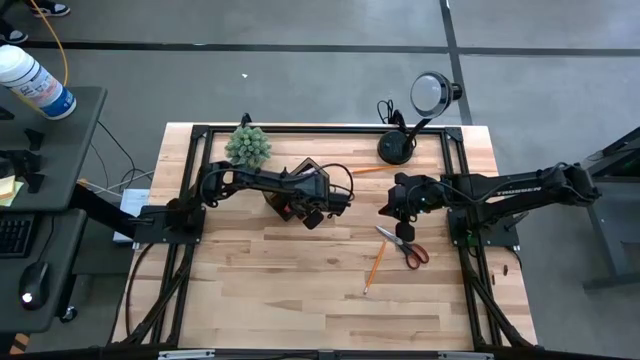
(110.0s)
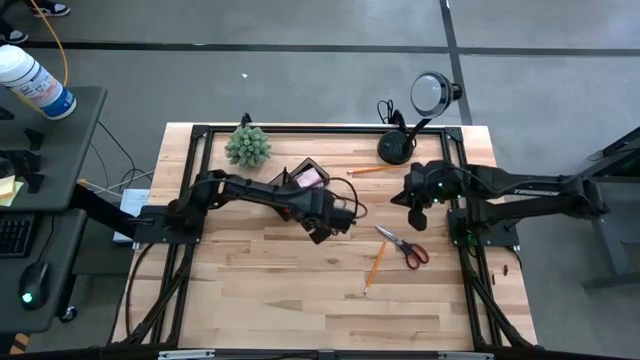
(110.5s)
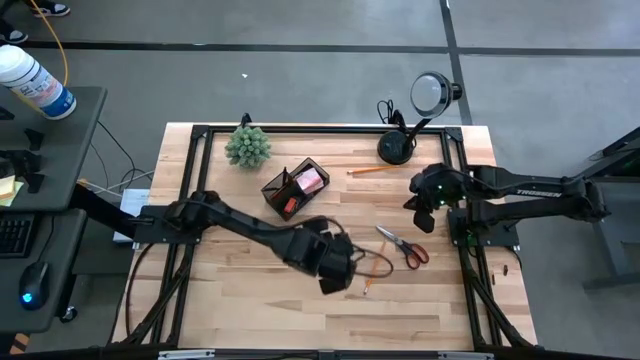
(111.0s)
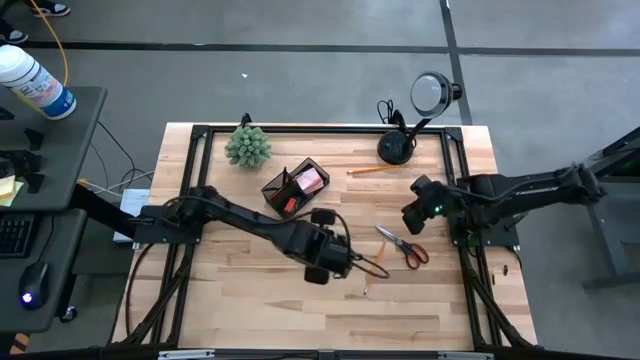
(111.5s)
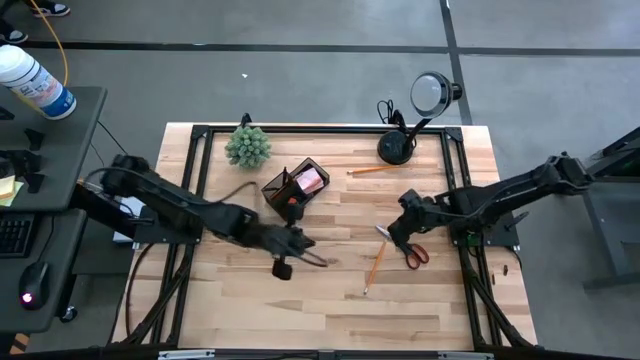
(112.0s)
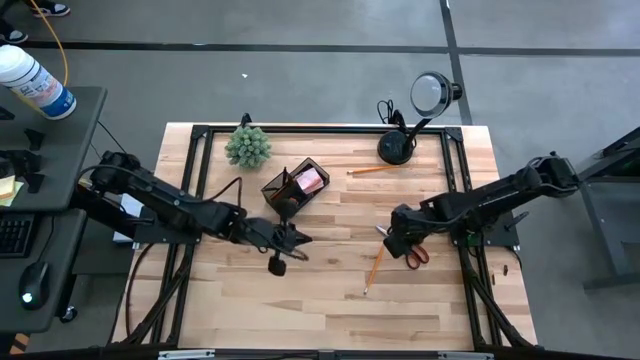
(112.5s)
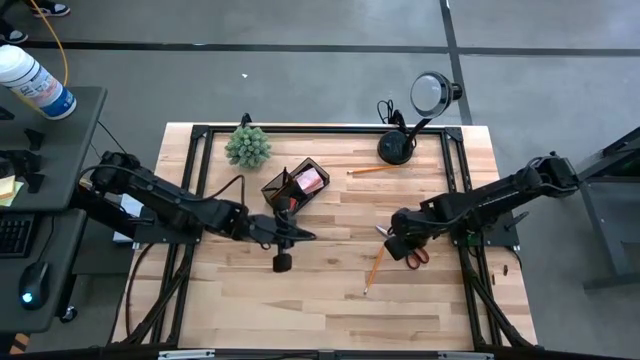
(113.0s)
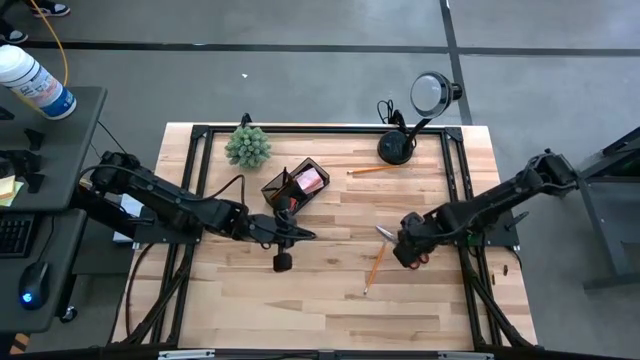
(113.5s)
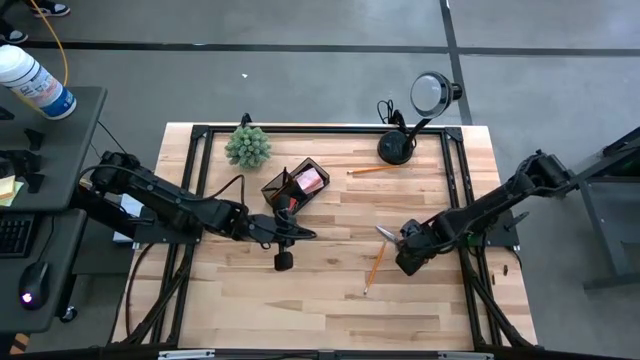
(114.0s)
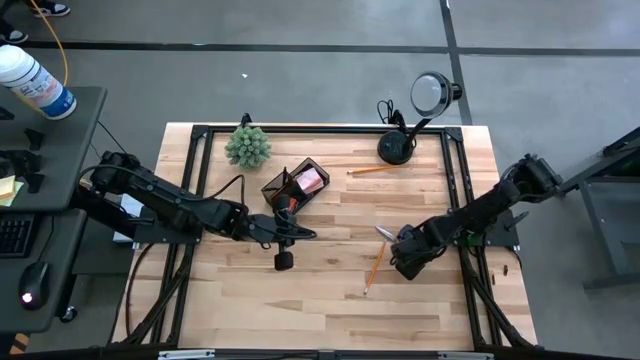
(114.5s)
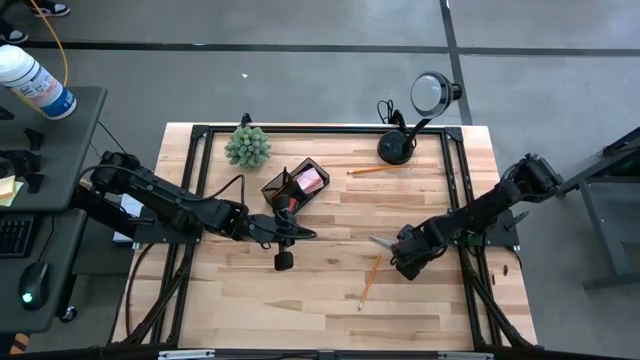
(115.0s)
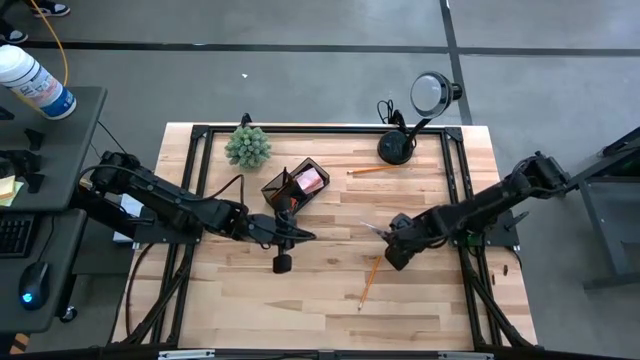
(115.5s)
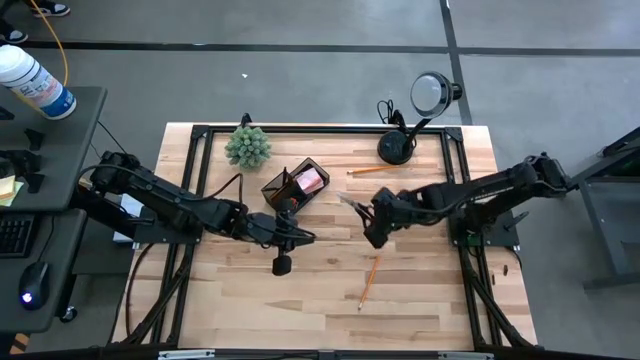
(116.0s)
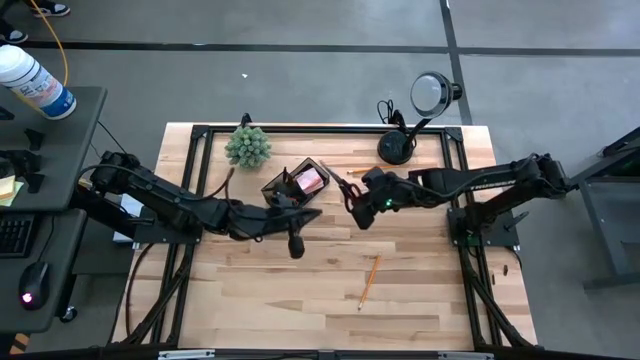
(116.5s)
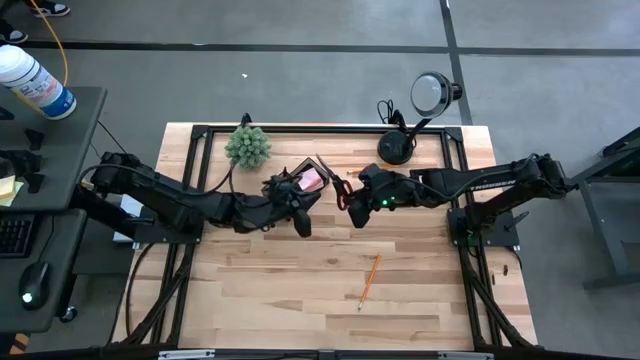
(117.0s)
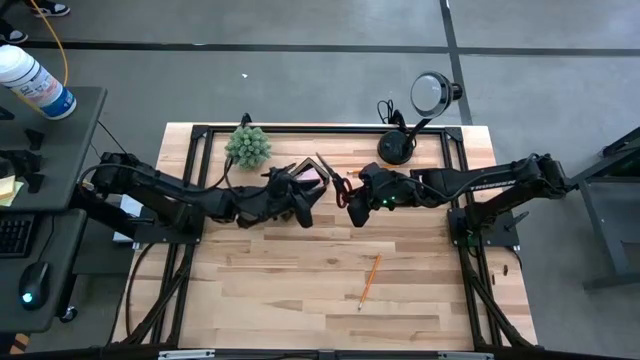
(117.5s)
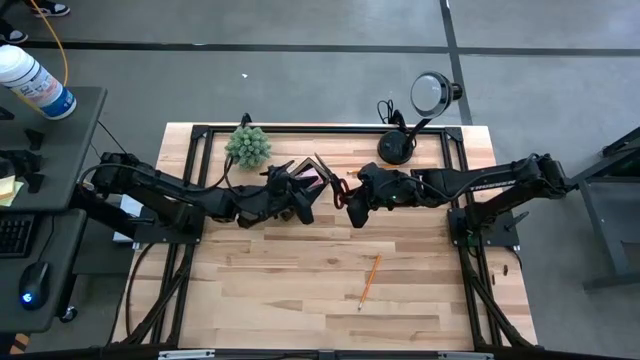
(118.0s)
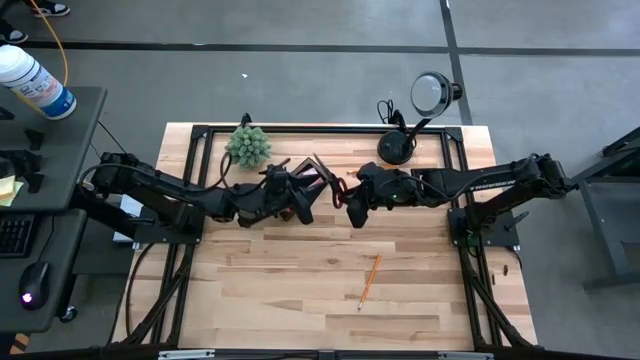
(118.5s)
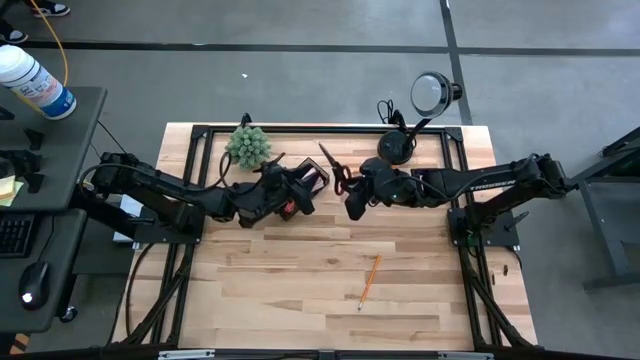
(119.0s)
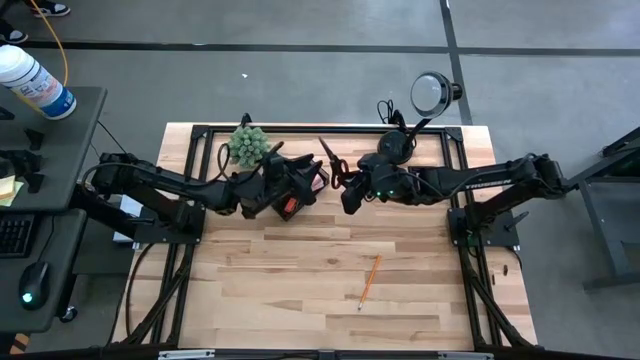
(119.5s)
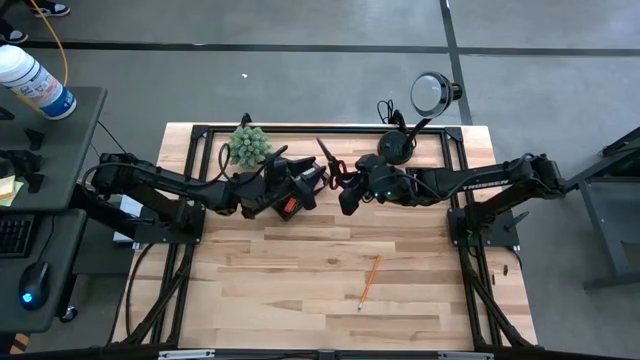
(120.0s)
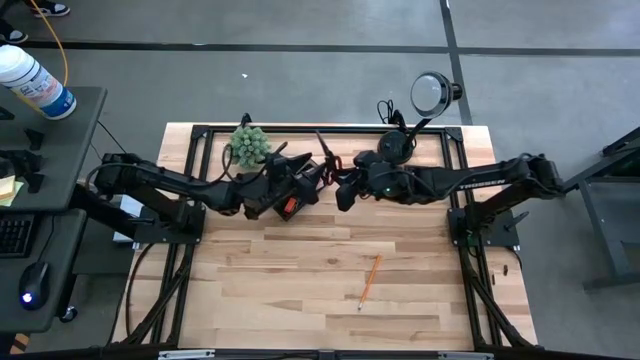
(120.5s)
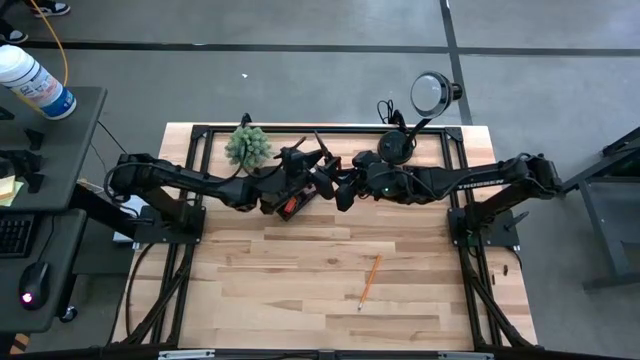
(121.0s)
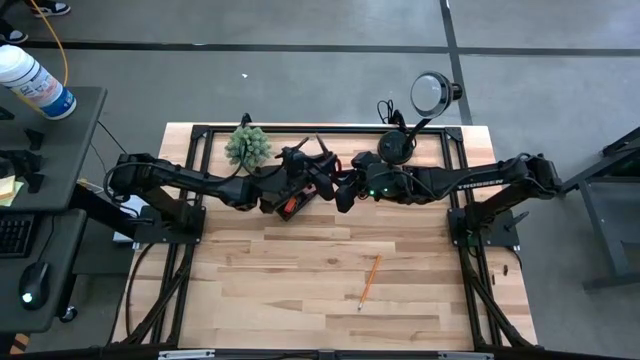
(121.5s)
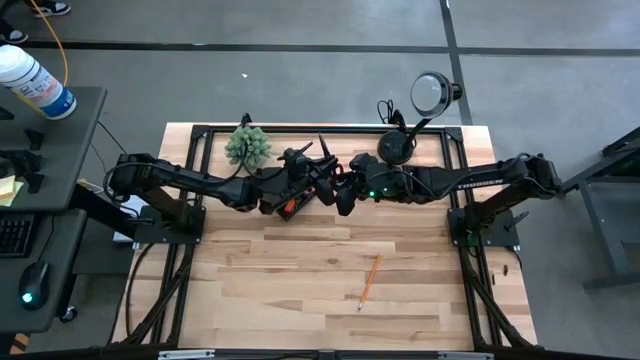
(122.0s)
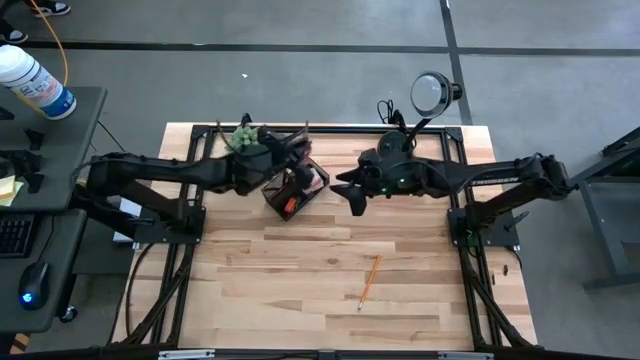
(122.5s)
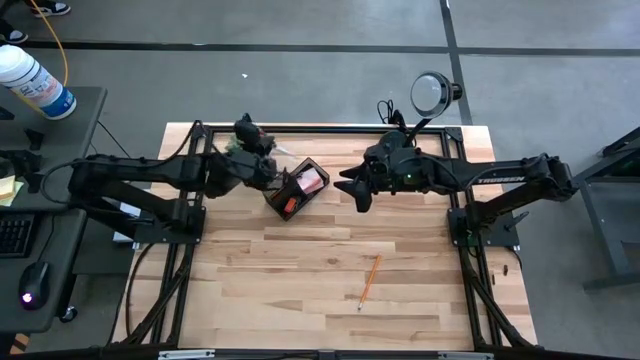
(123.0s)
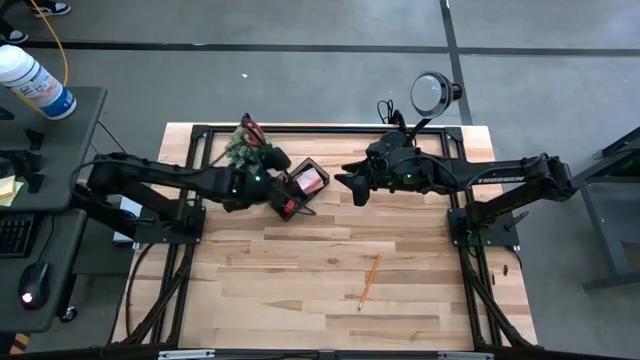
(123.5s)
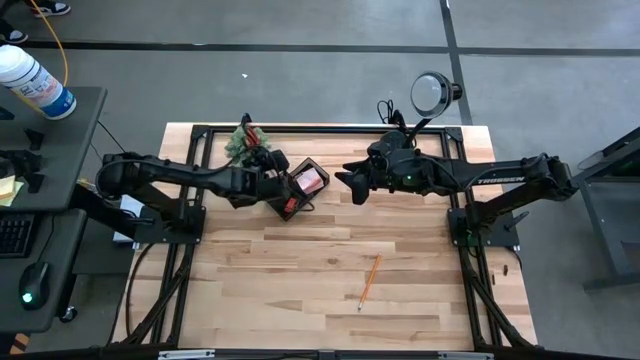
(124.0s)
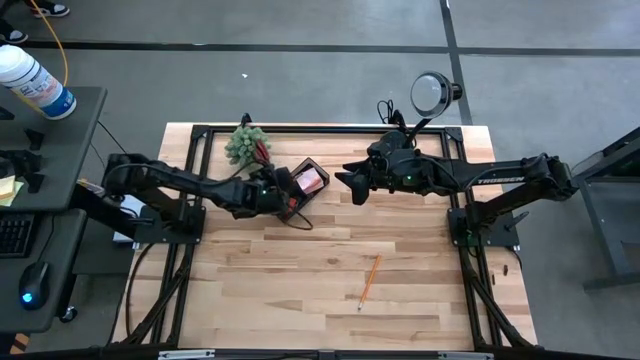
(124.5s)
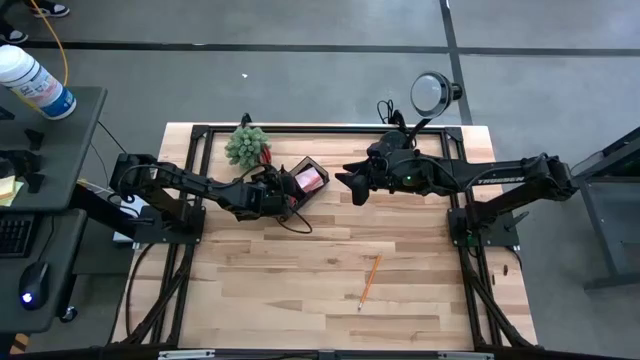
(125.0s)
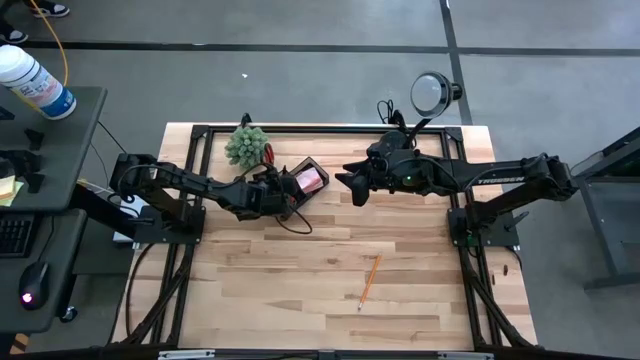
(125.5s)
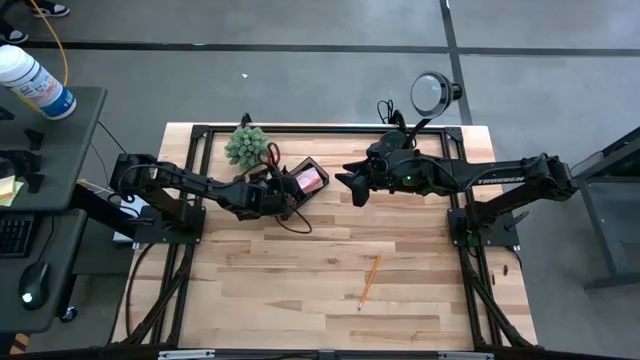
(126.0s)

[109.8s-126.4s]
Task: Pick and place office supplies into organizer
Put the black scissor into the black desk organizer
